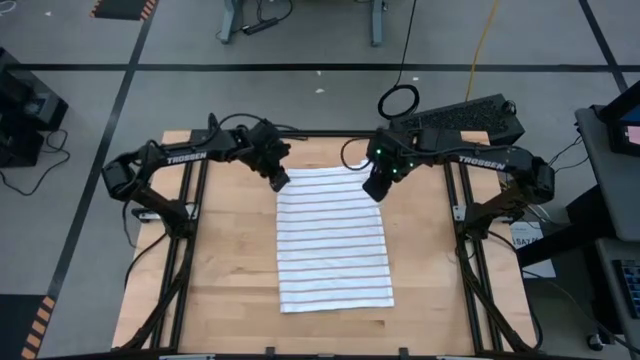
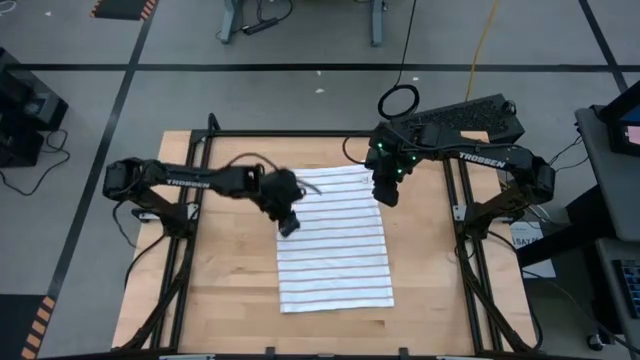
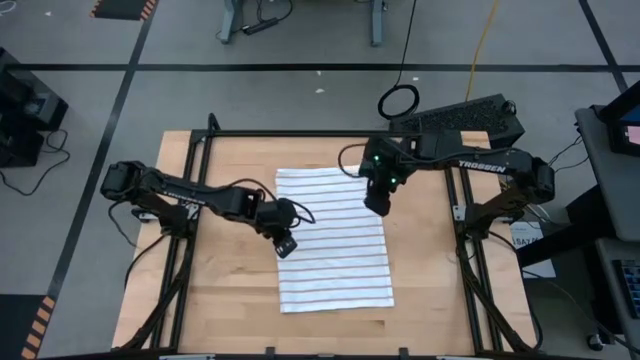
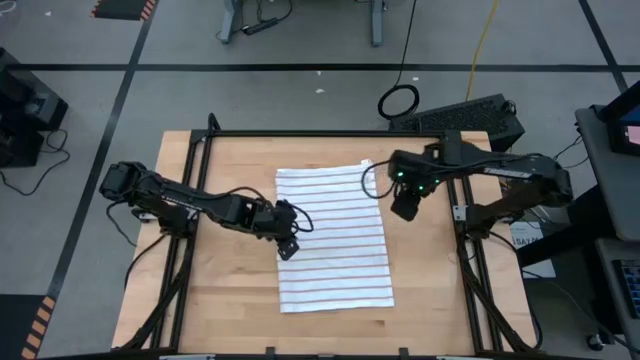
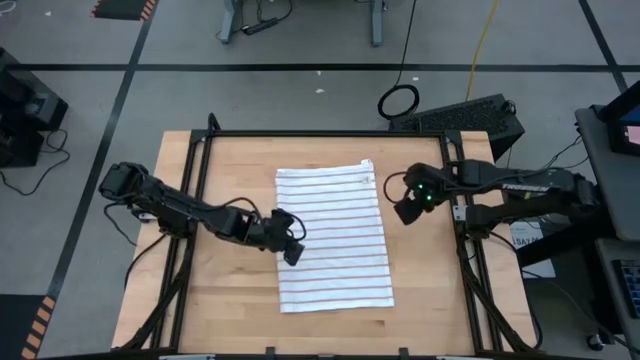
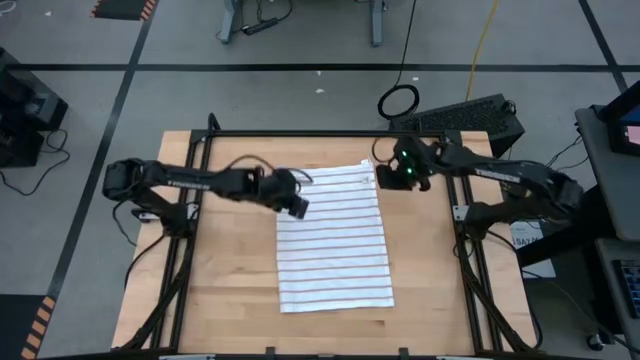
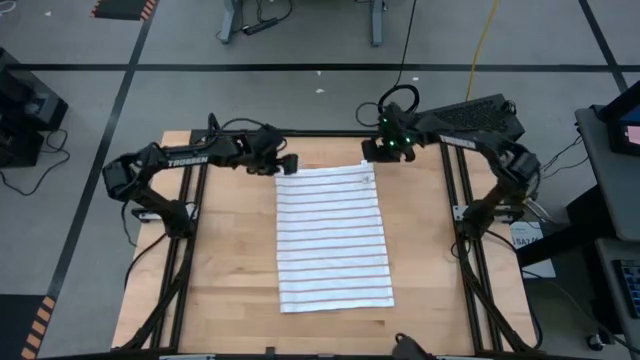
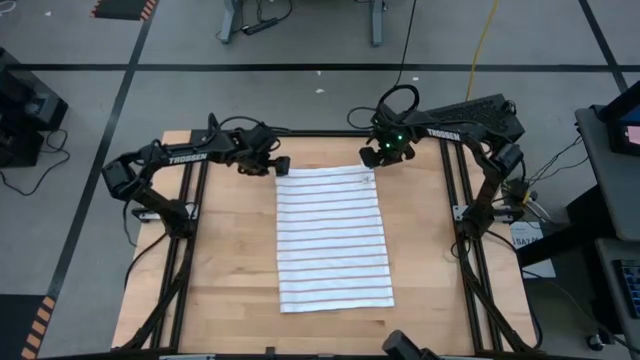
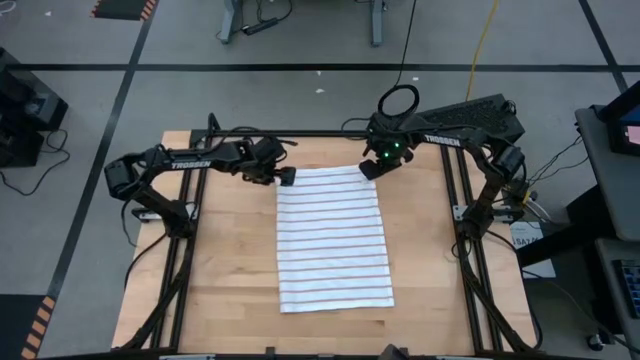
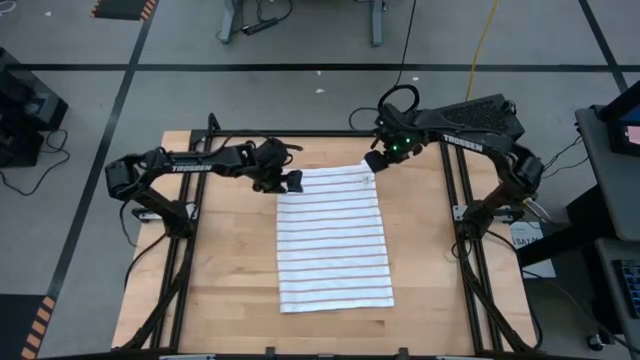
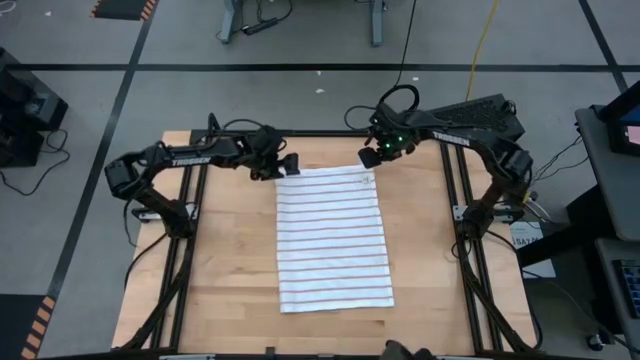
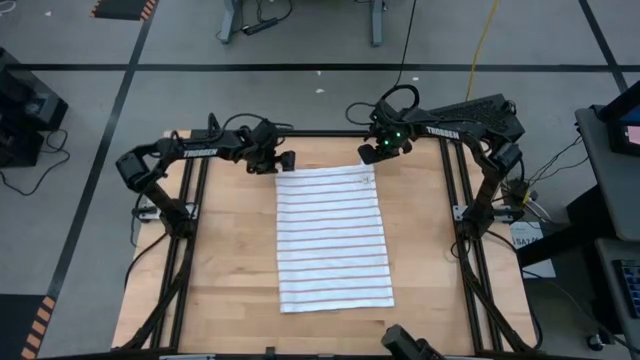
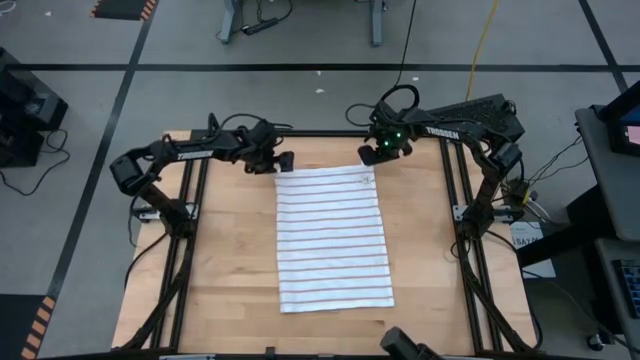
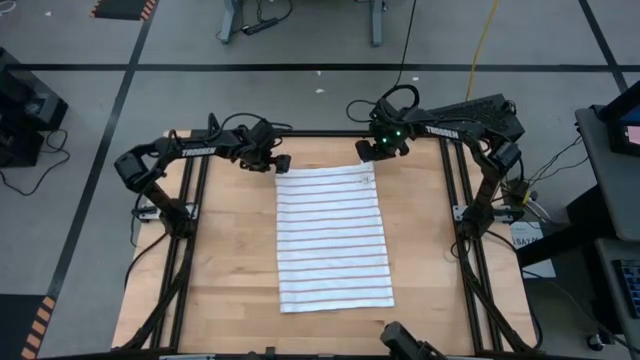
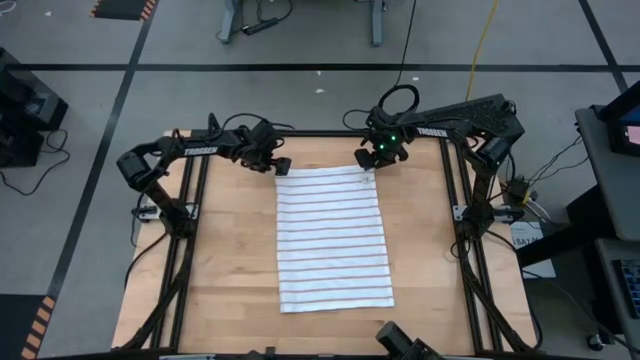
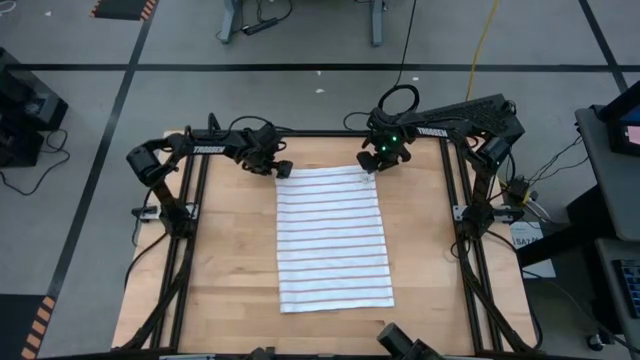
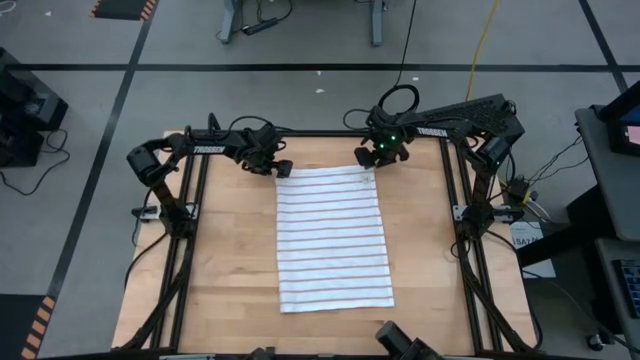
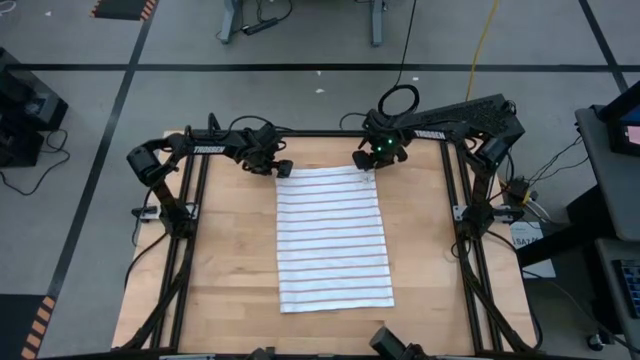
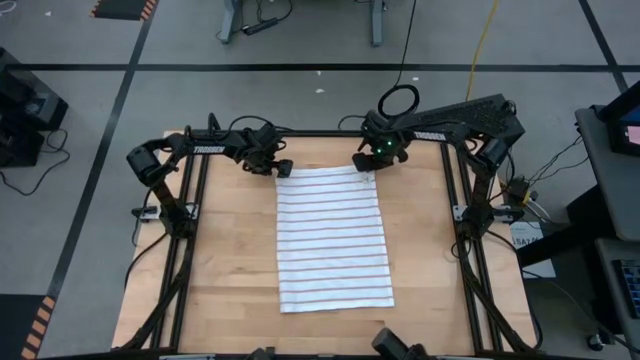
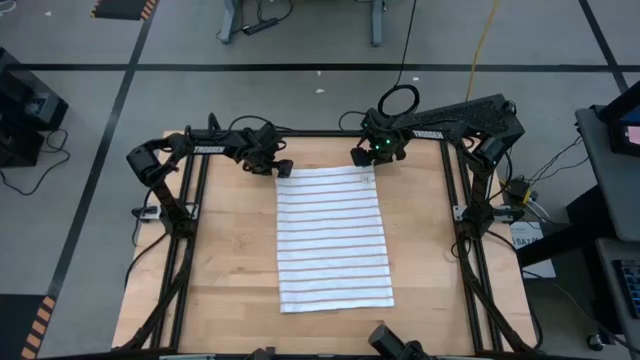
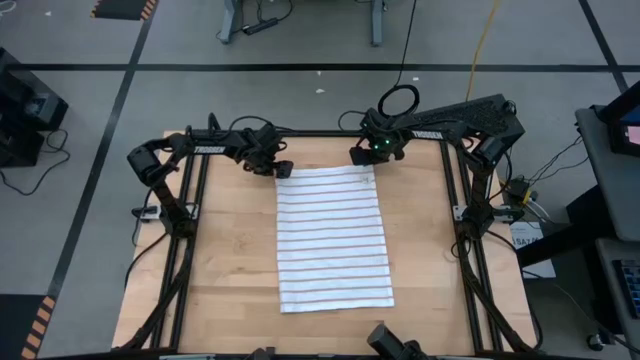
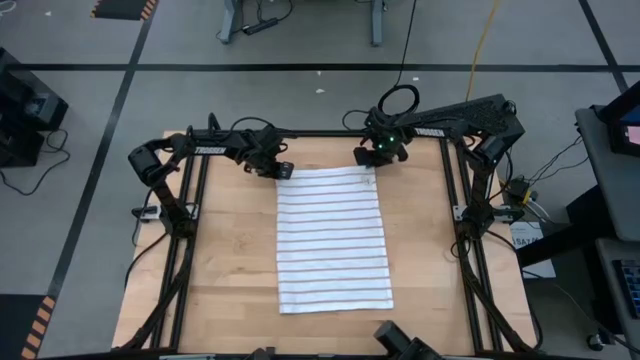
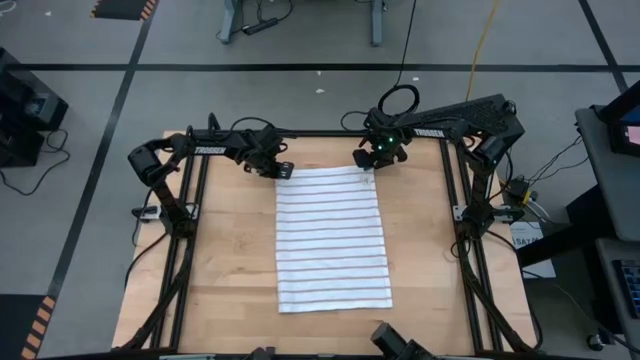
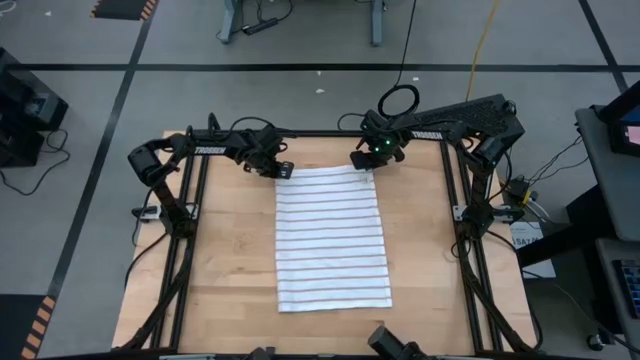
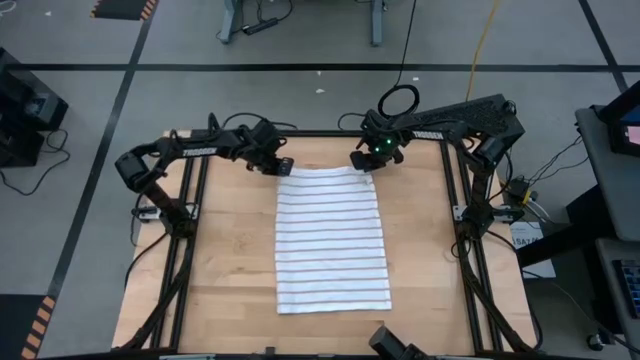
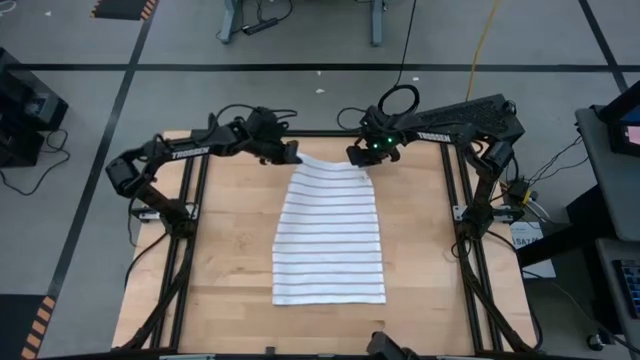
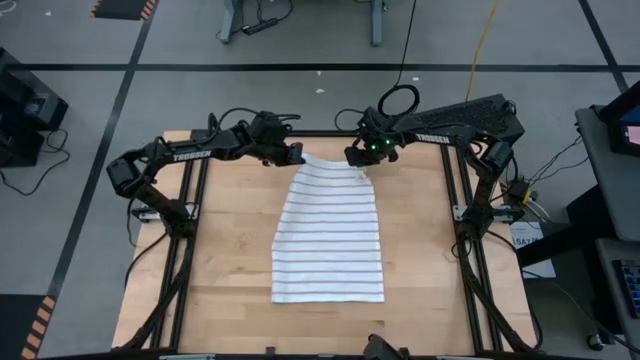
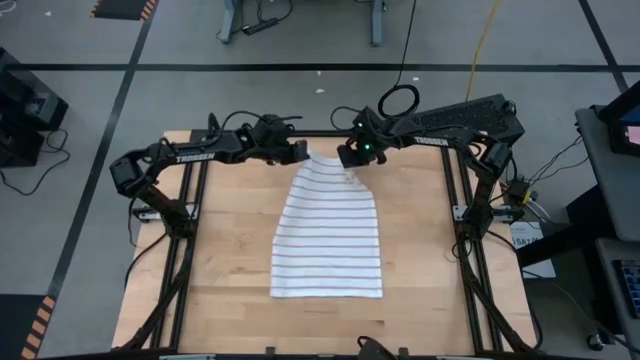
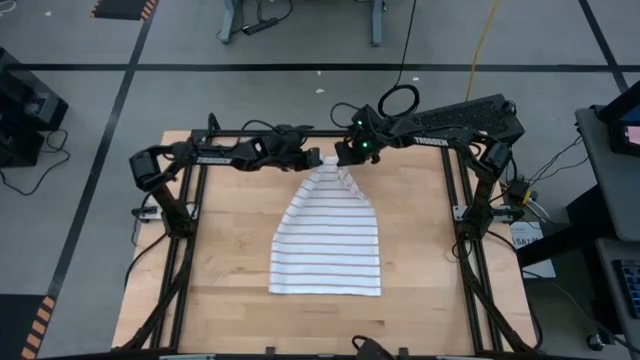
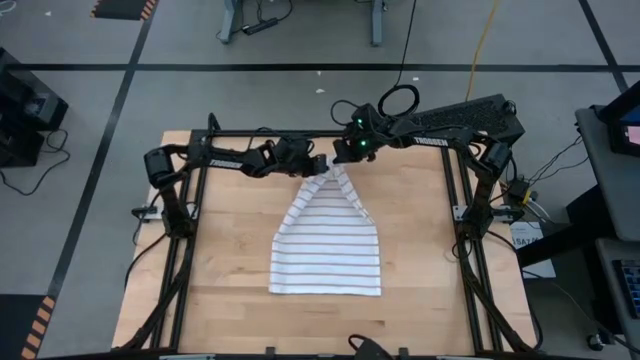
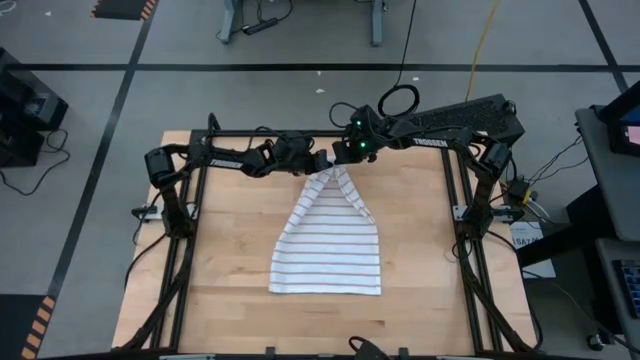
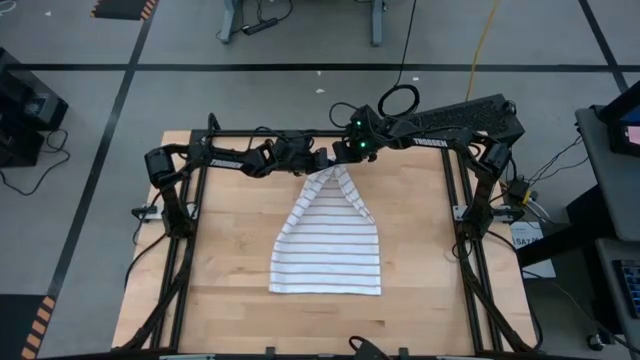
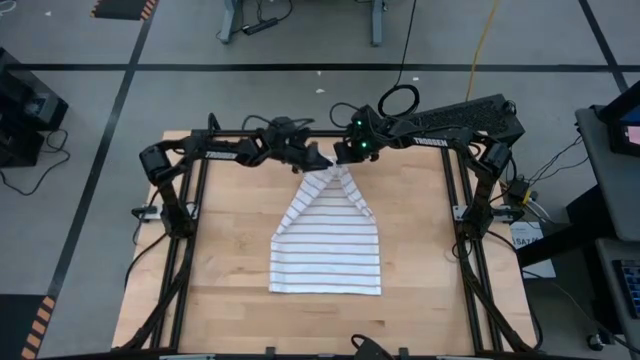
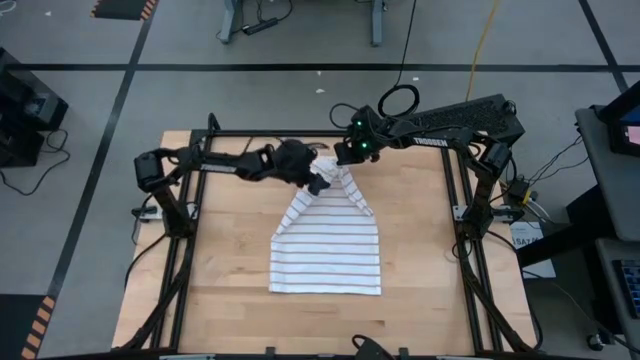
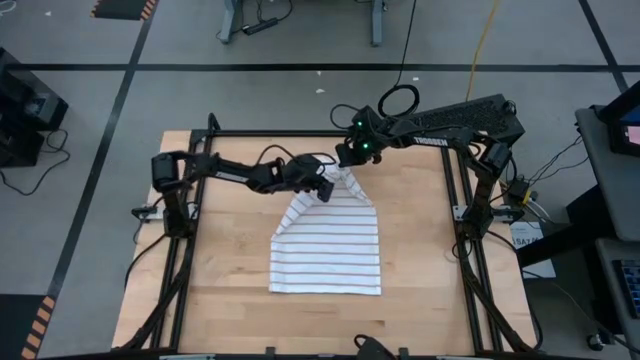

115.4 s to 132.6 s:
Task: Roll towel
Roll the white towel

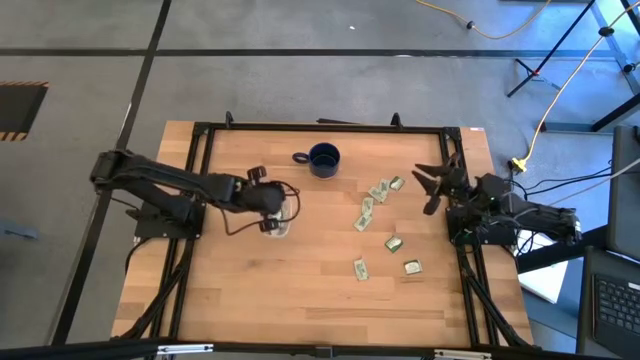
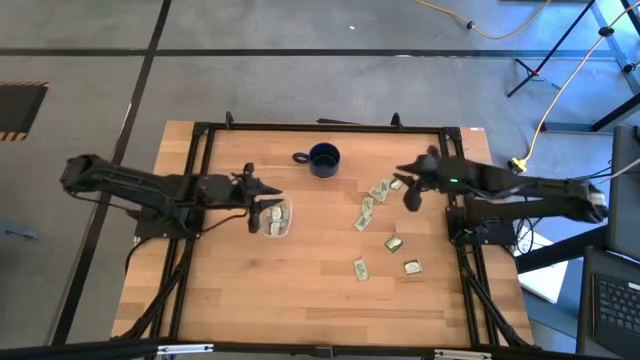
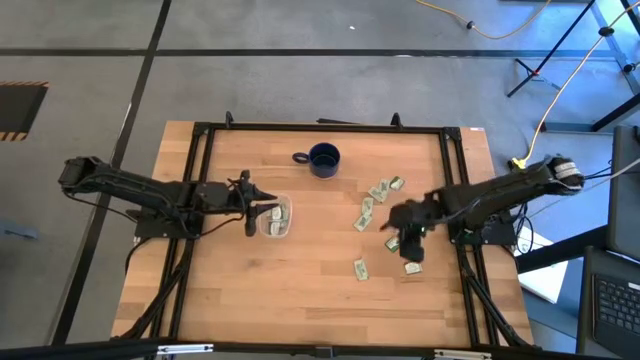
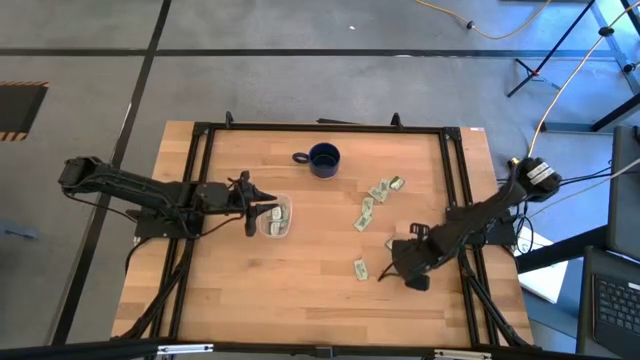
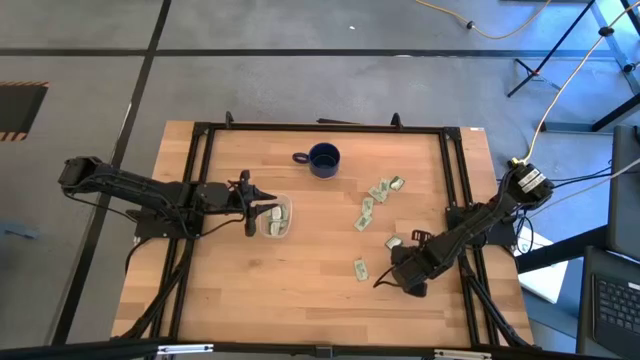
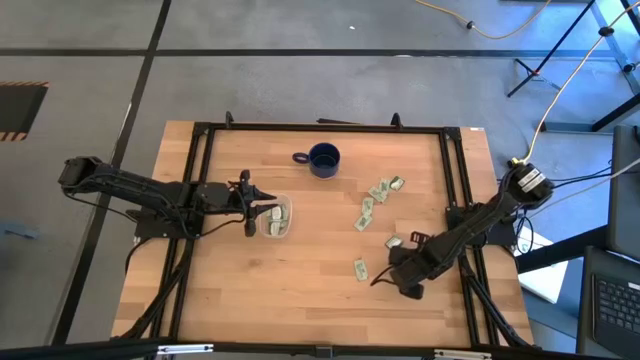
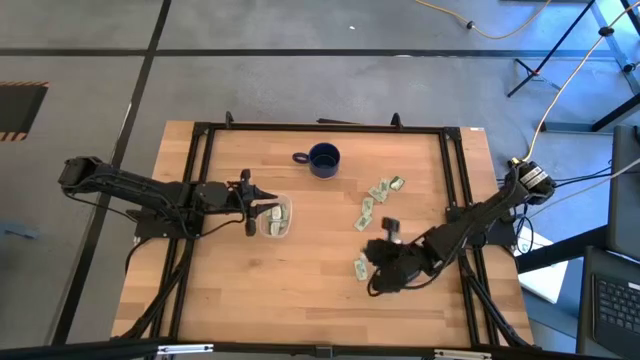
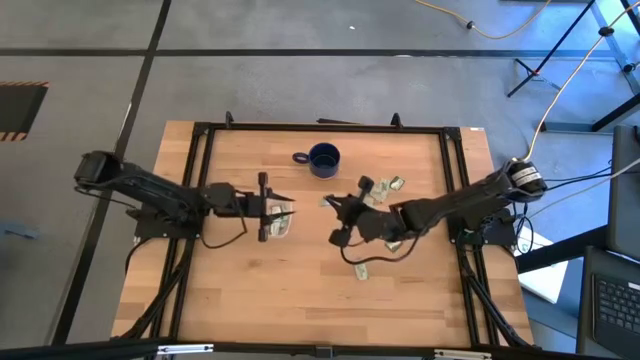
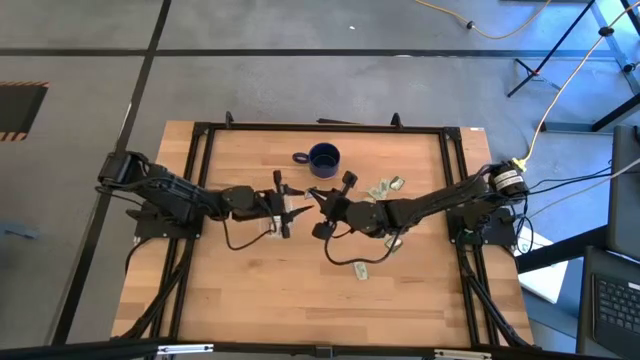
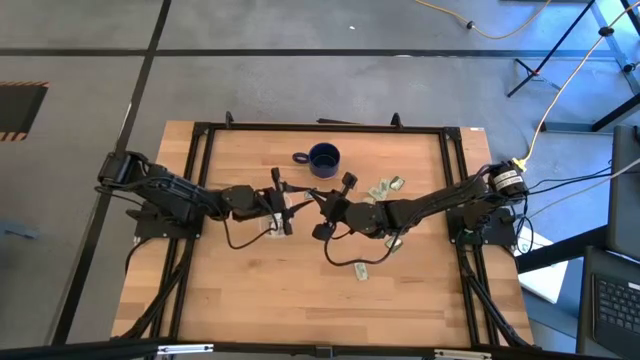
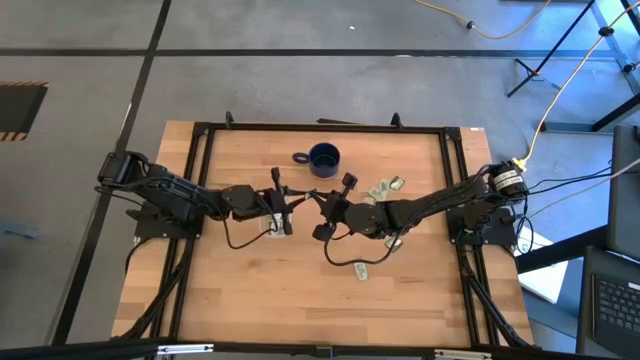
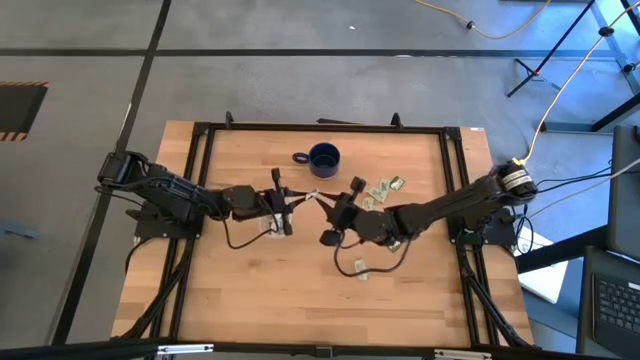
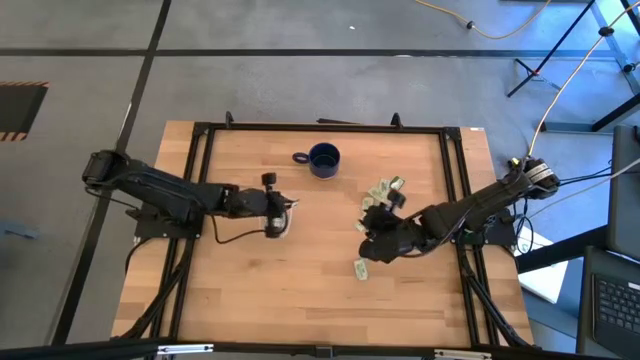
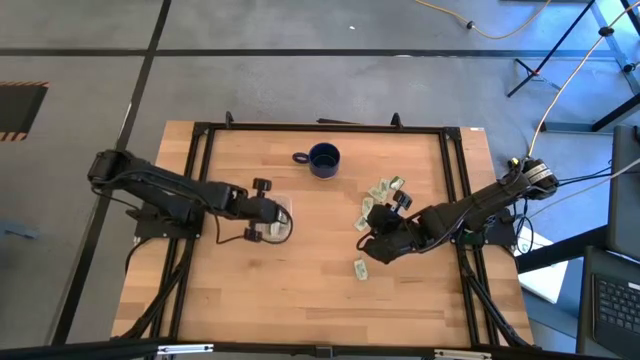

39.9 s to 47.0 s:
Task: Pick and place Stevia / Truvia into bins
Put the bottom green stevia packet into the transparent container
